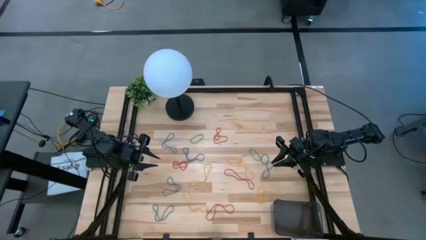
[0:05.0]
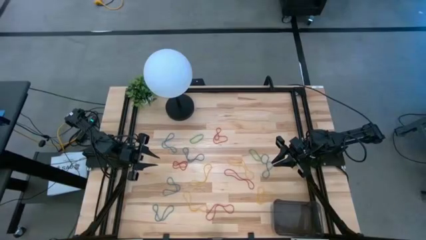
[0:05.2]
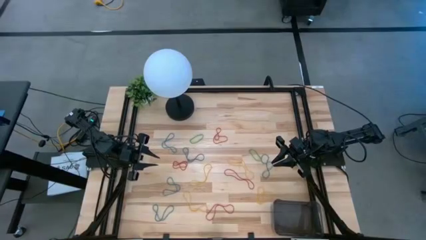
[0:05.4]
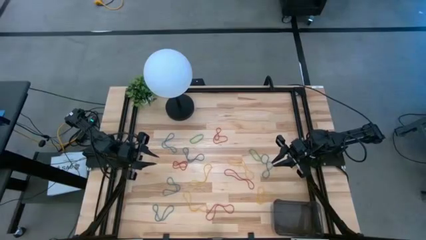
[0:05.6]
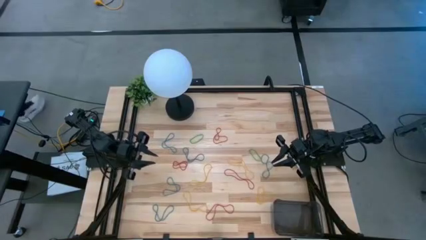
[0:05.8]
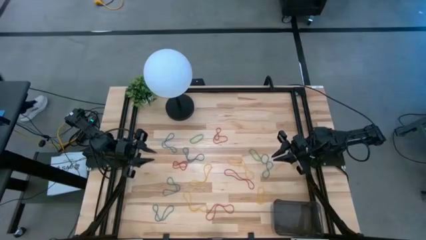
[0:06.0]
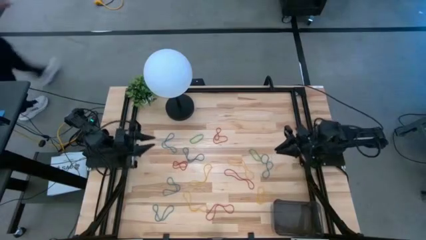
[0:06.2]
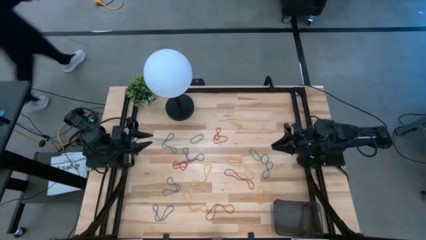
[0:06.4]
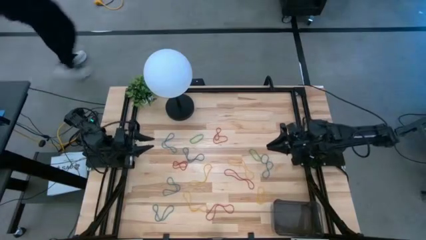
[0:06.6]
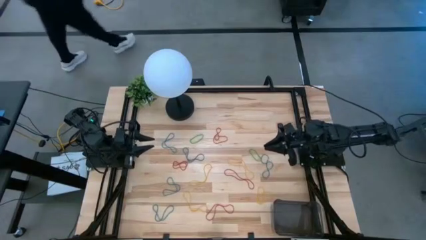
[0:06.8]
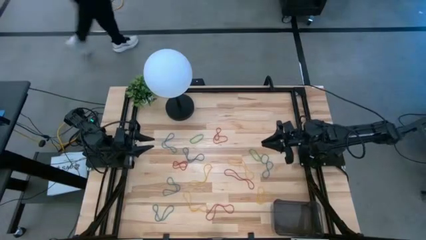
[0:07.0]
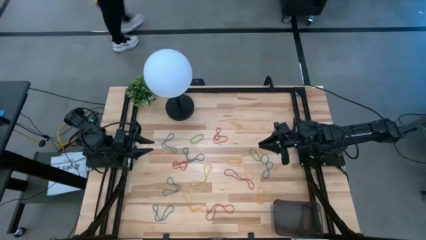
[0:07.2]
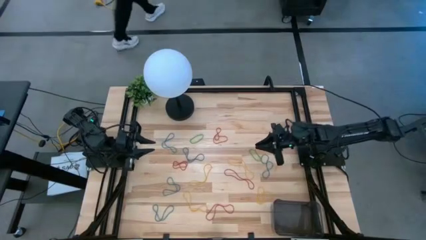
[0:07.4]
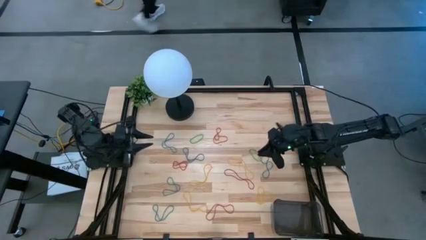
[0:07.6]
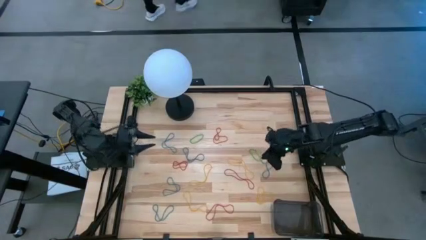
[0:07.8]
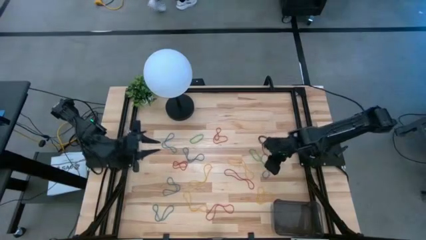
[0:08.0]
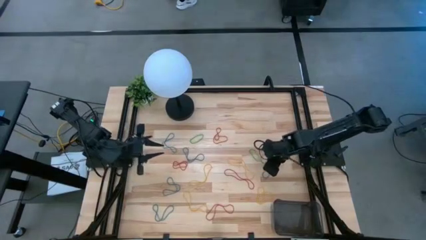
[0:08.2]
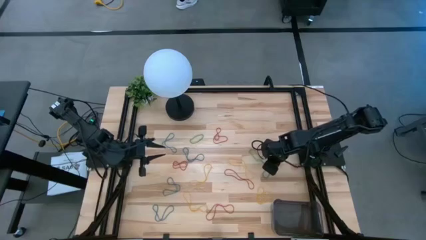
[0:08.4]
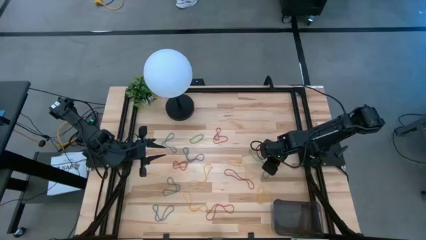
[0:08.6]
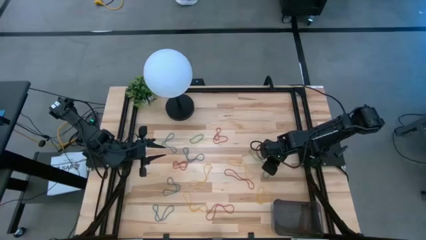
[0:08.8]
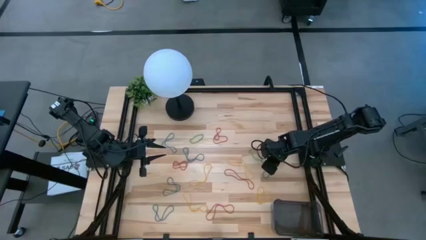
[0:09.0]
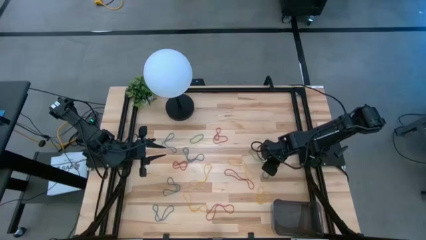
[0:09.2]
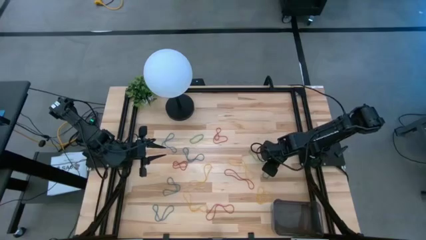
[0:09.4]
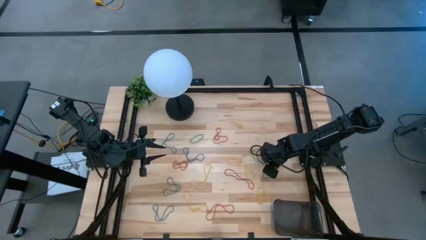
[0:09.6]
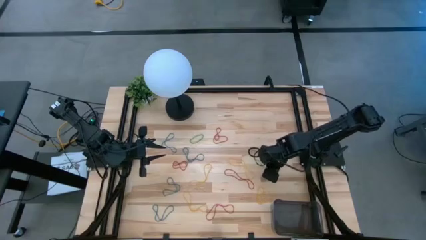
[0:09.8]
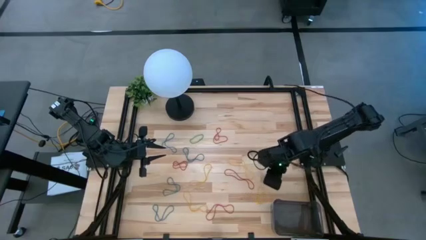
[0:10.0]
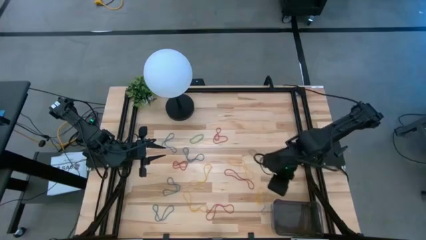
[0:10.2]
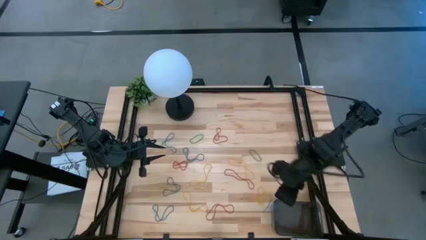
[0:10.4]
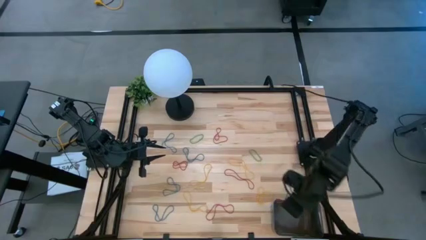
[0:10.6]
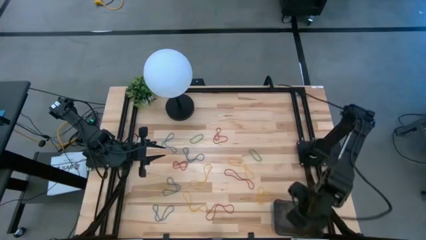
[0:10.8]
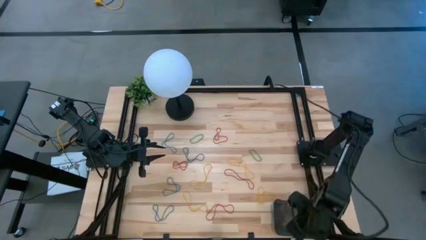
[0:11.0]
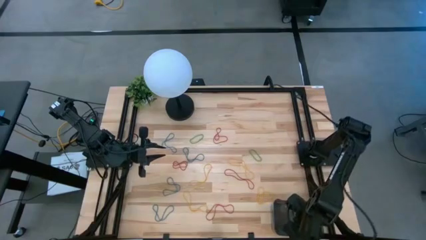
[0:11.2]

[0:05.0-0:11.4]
Task: Pick and place items into bin
Put the blue rubber band into the black bin

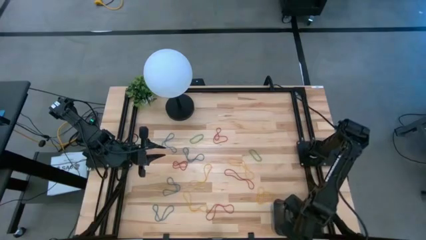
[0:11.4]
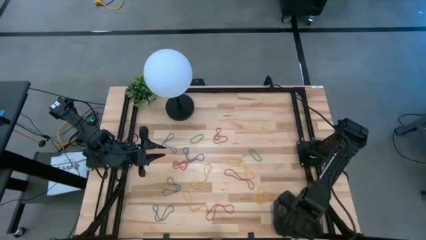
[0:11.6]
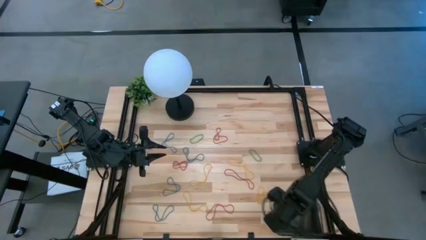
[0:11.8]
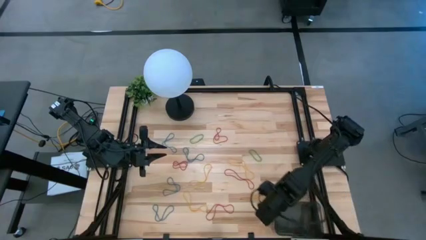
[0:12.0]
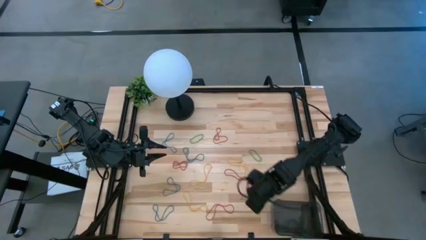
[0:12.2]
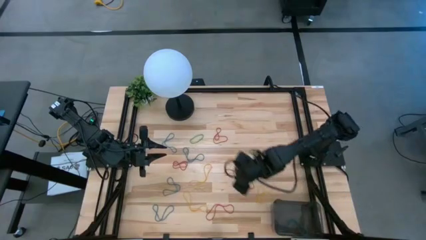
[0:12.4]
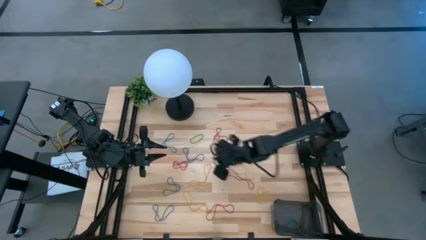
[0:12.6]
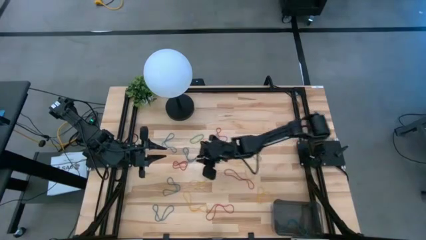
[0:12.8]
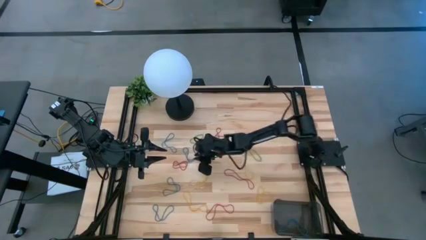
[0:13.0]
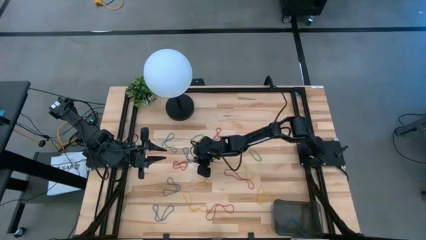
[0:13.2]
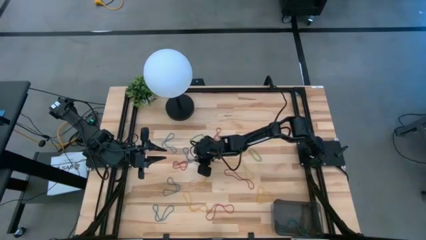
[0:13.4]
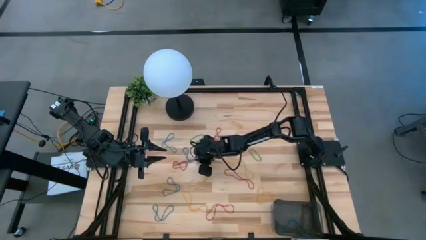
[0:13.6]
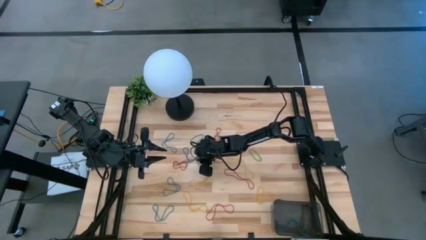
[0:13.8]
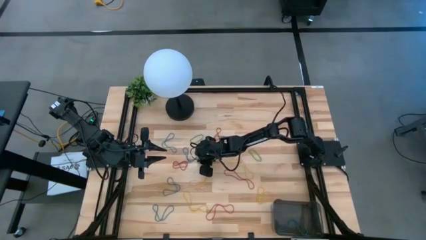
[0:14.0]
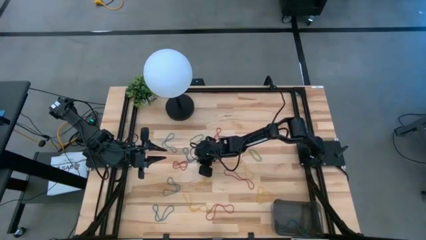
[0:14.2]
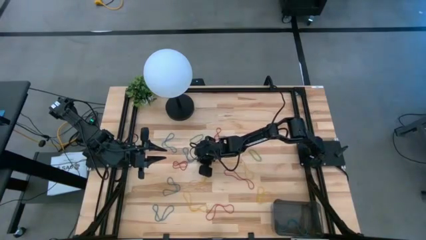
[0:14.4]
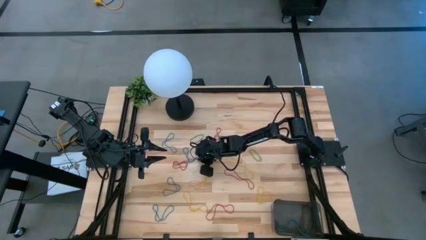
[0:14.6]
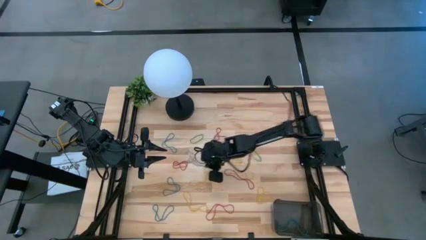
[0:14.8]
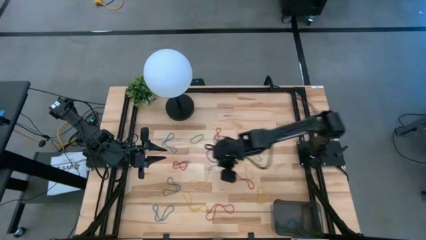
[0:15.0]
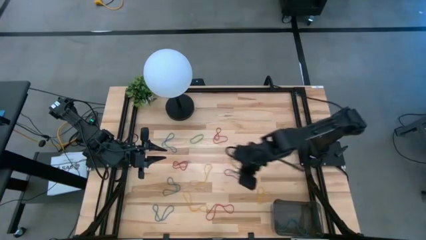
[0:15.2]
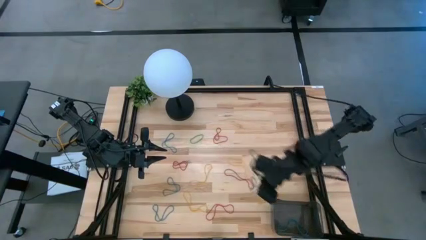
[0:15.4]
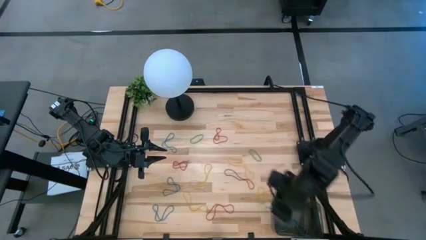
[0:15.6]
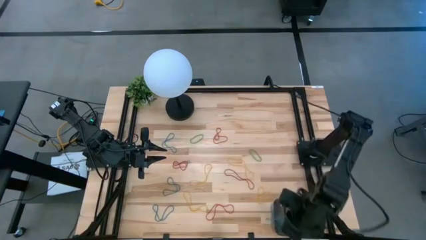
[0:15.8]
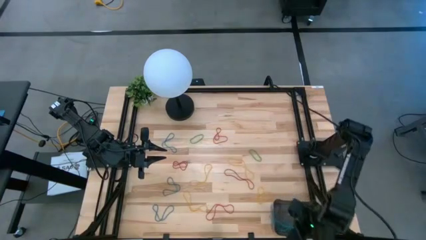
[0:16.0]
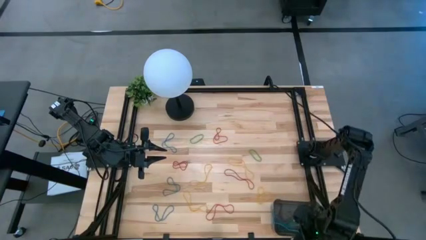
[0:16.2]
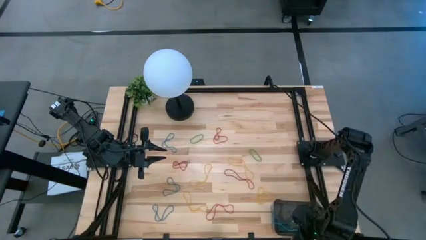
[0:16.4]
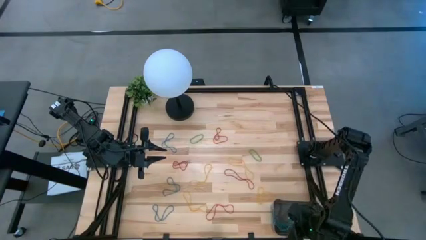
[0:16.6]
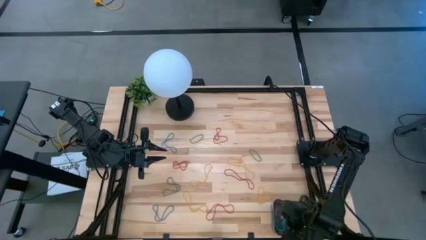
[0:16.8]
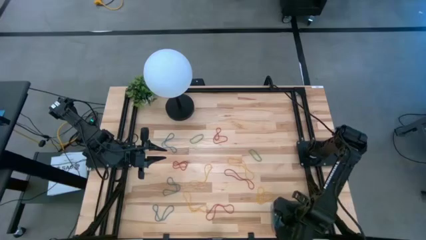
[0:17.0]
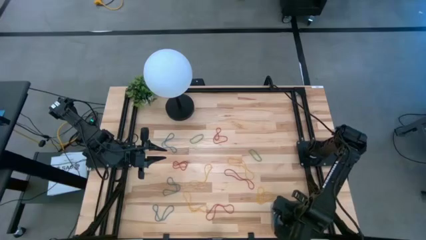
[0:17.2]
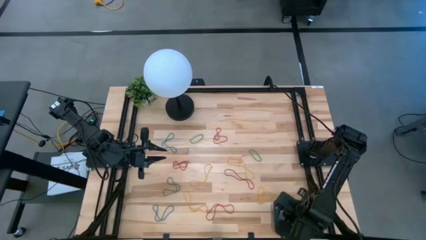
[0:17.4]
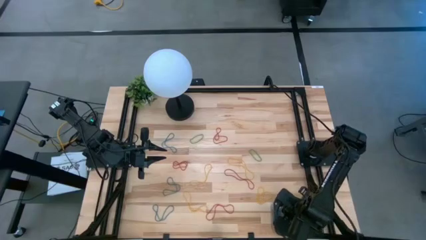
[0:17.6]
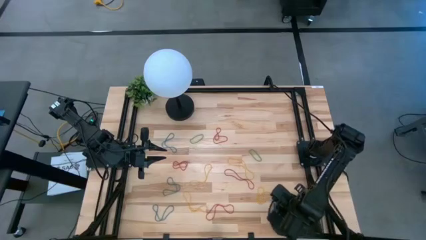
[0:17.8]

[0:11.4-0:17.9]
Put the blue rubber band into the black bin

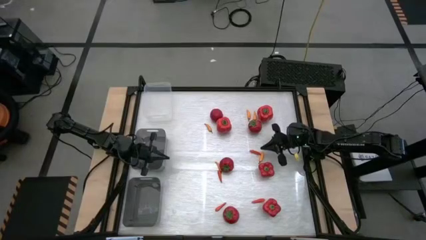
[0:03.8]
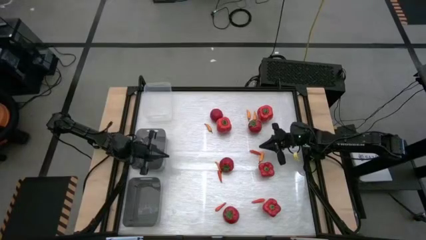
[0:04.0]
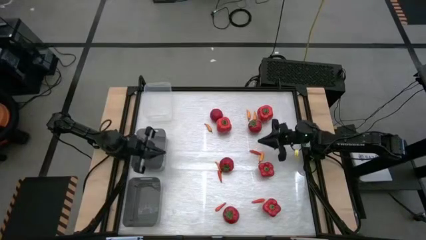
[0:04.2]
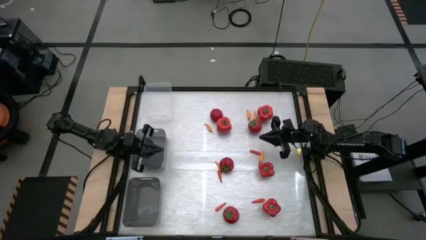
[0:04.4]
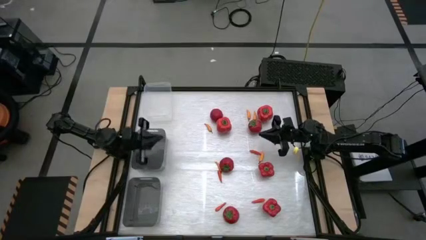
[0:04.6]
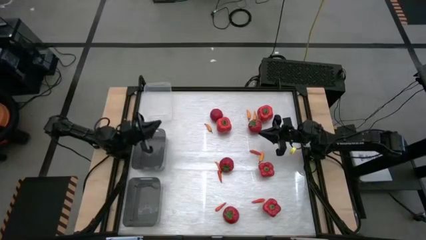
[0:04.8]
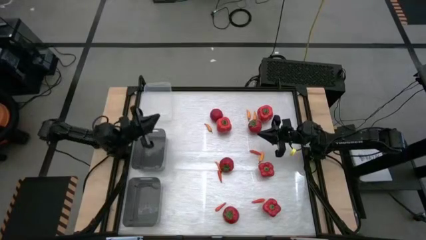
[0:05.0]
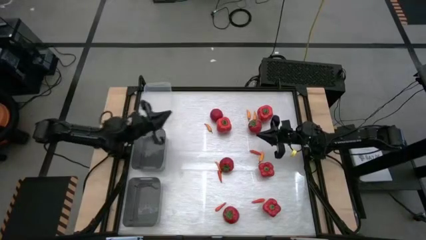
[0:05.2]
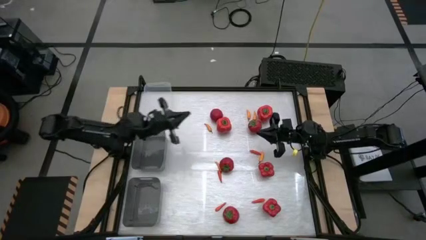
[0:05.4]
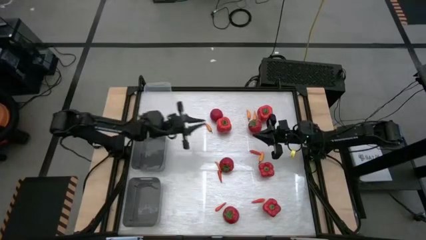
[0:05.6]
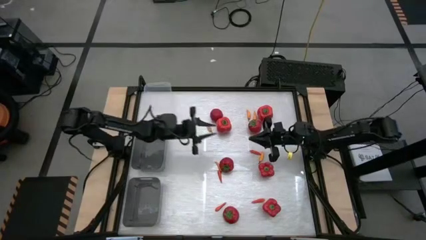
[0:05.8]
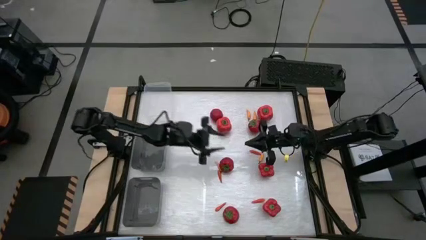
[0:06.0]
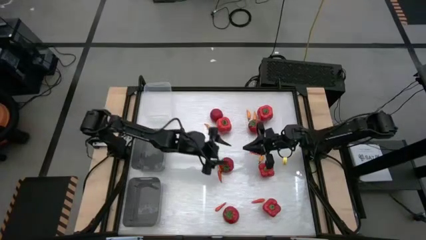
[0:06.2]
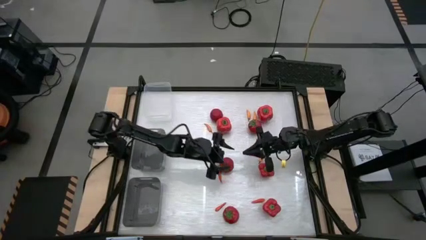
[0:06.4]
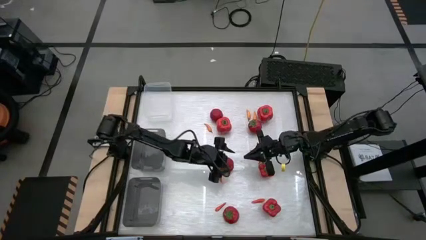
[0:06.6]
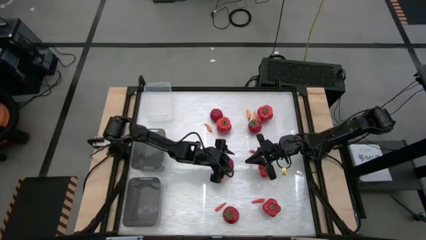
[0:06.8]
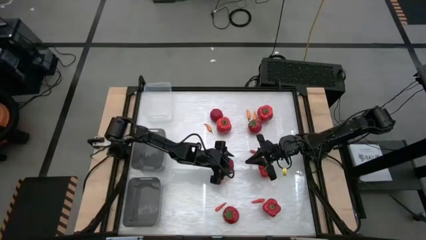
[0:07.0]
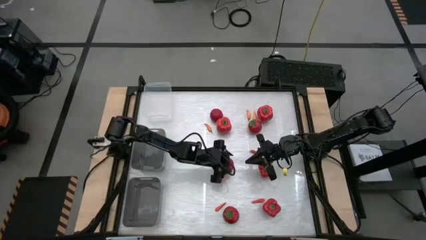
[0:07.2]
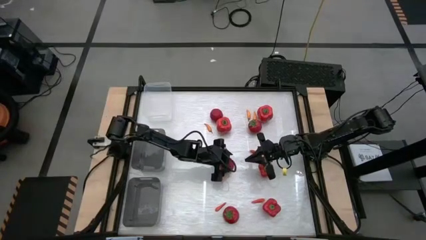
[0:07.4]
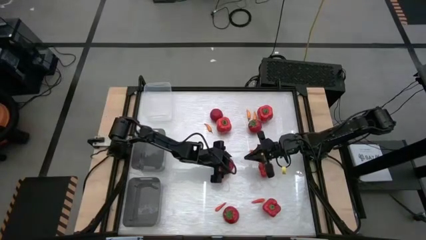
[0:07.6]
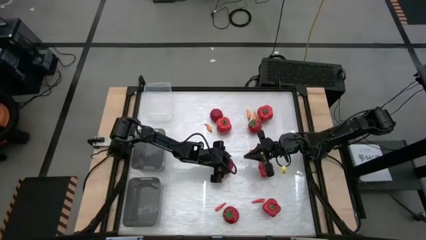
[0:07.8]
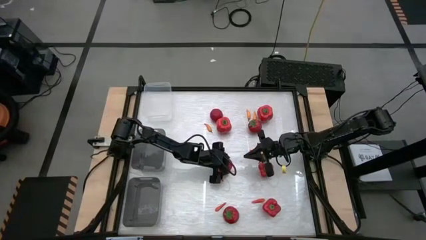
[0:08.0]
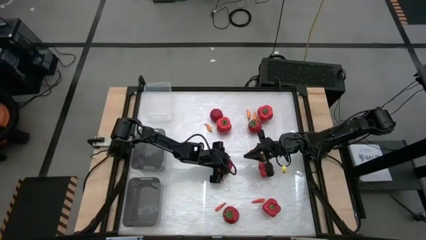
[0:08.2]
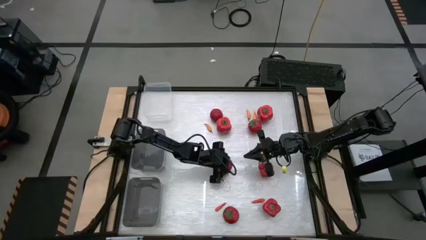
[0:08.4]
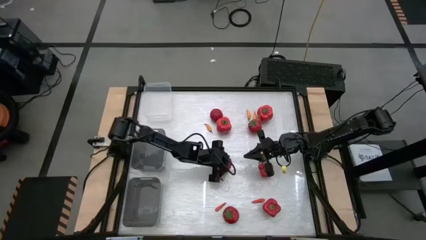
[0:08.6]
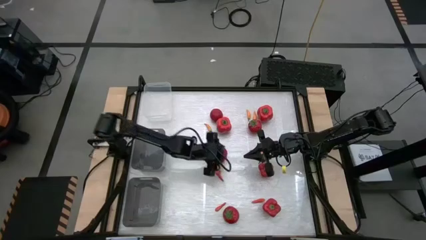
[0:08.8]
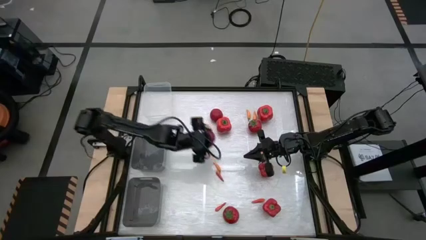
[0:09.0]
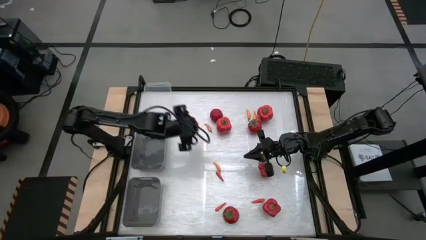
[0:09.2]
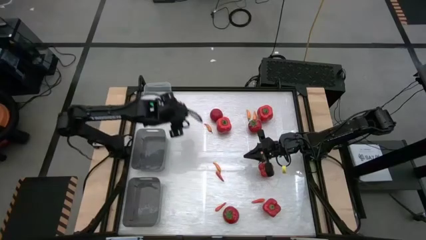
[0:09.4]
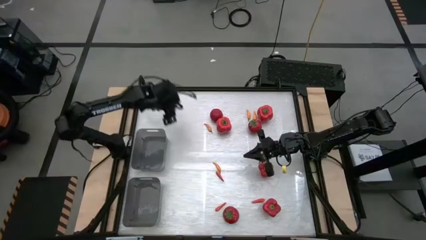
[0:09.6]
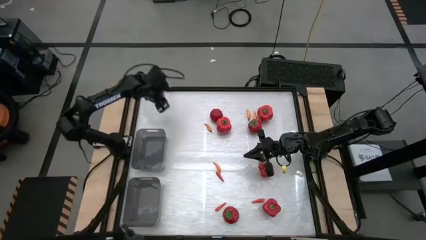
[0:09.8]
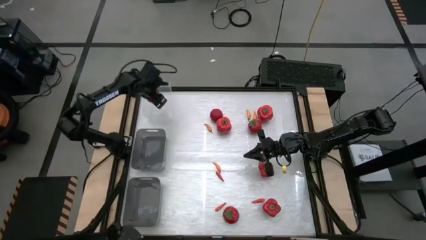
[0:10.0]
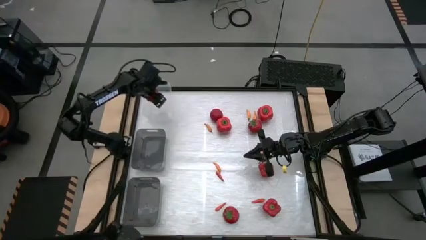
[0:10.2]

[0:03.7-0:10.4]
Task: Sort produce into baskets
Put the tomato into the transparent bin
